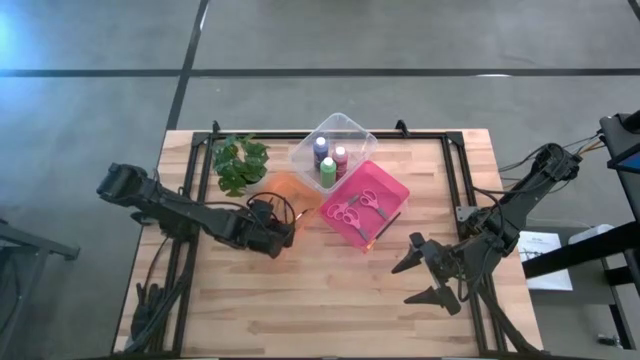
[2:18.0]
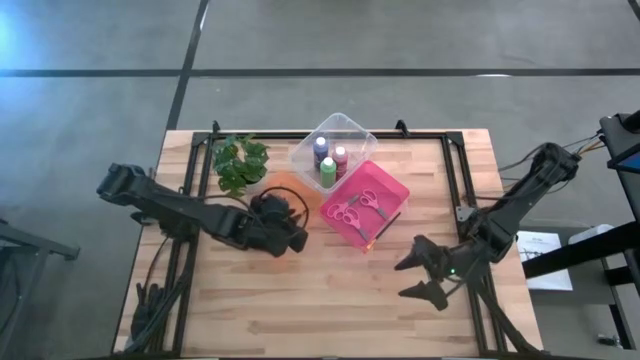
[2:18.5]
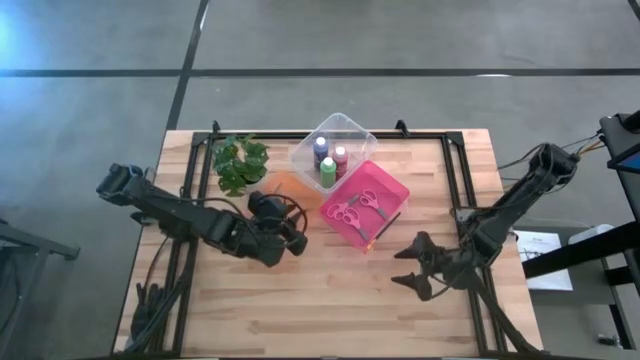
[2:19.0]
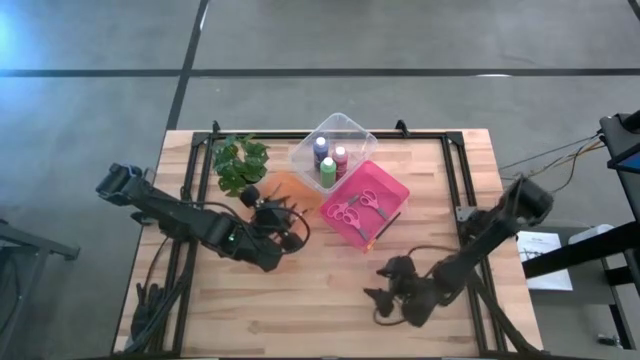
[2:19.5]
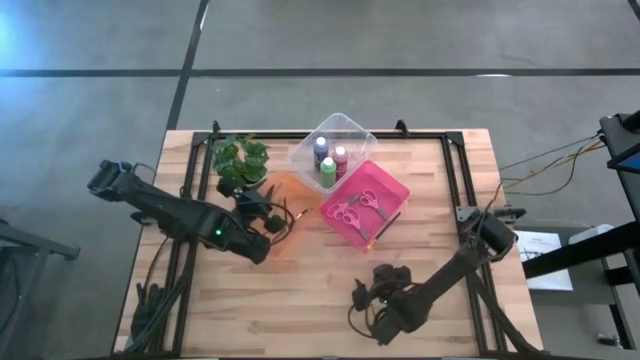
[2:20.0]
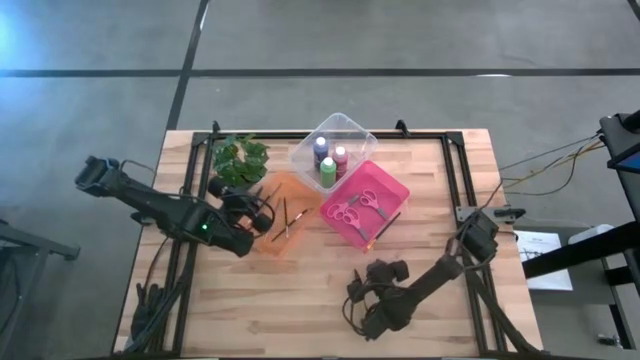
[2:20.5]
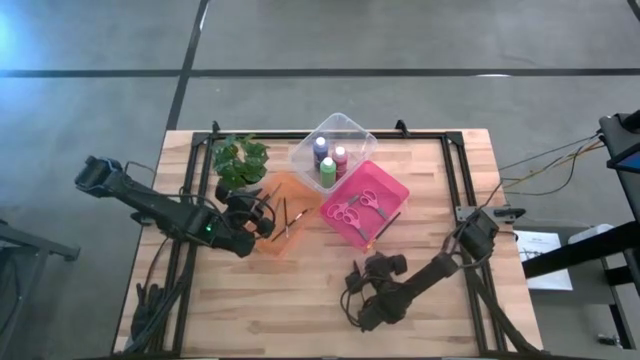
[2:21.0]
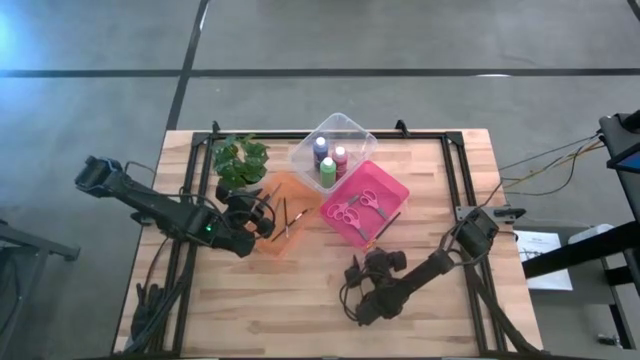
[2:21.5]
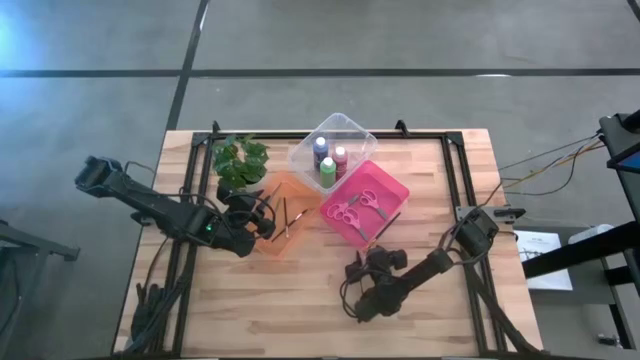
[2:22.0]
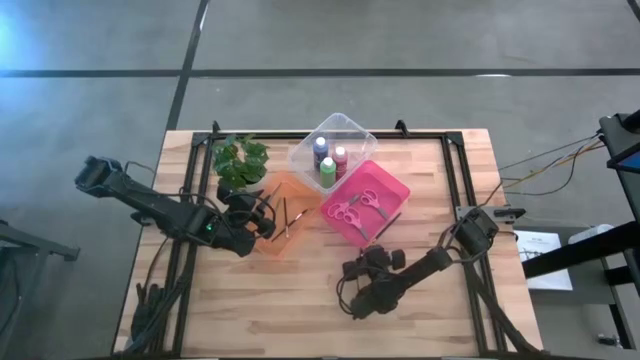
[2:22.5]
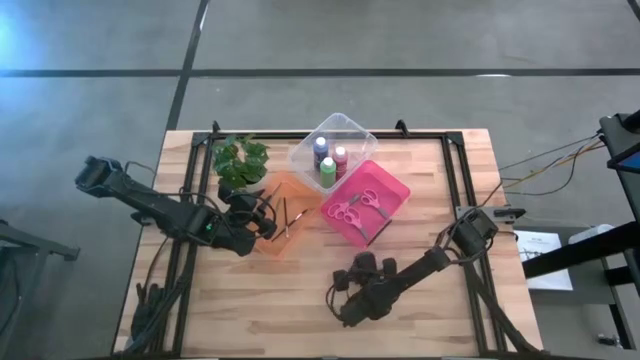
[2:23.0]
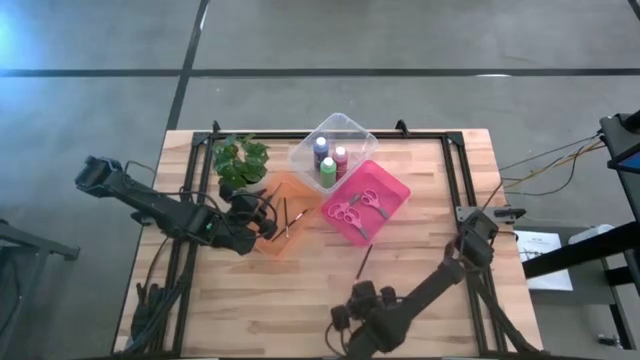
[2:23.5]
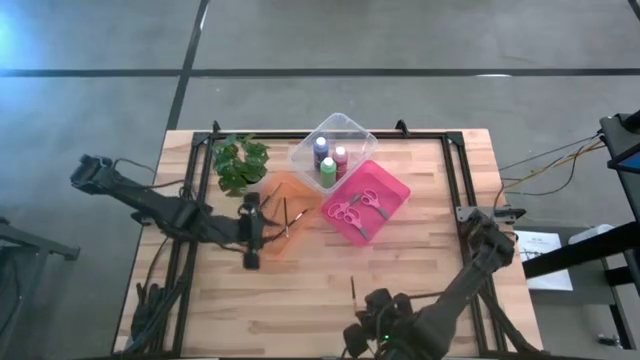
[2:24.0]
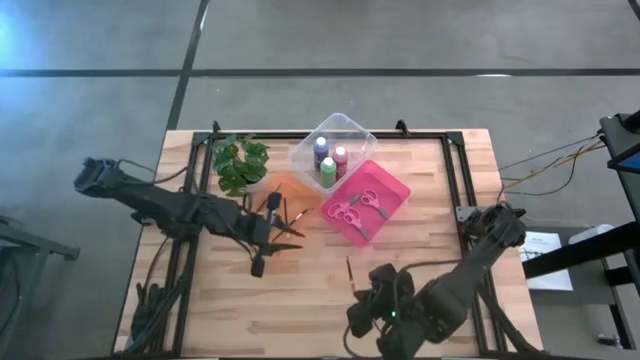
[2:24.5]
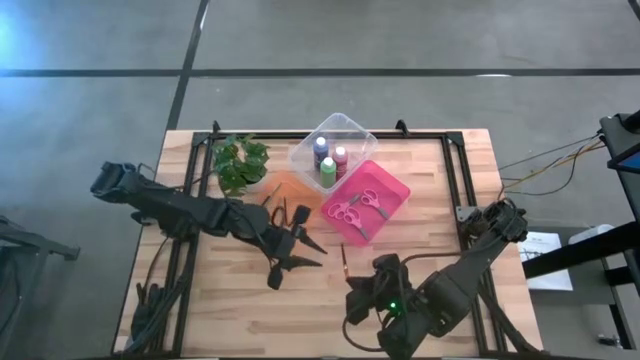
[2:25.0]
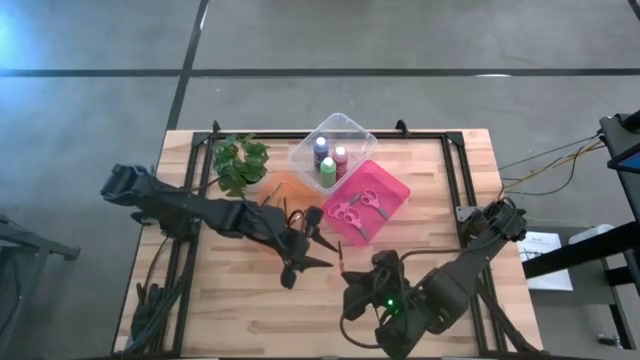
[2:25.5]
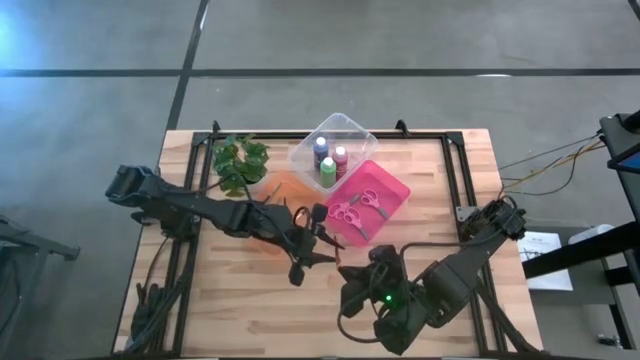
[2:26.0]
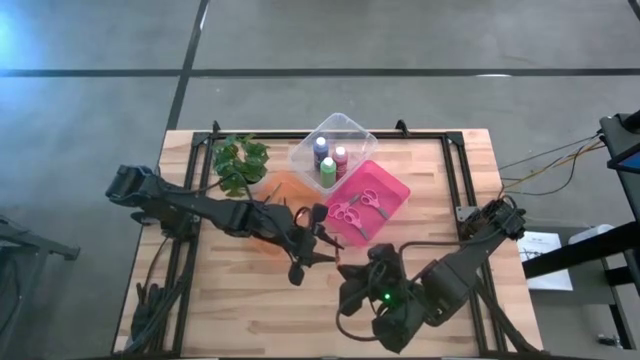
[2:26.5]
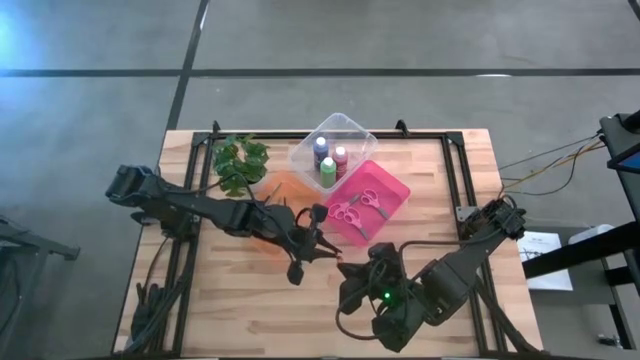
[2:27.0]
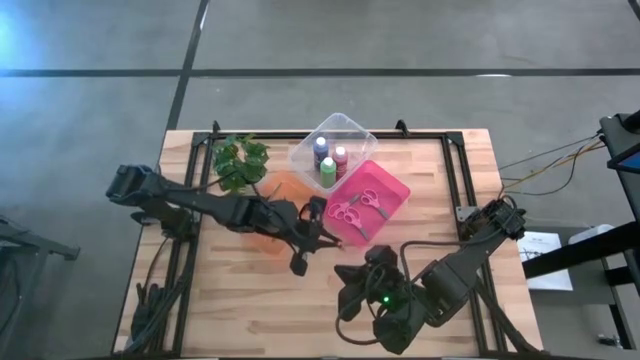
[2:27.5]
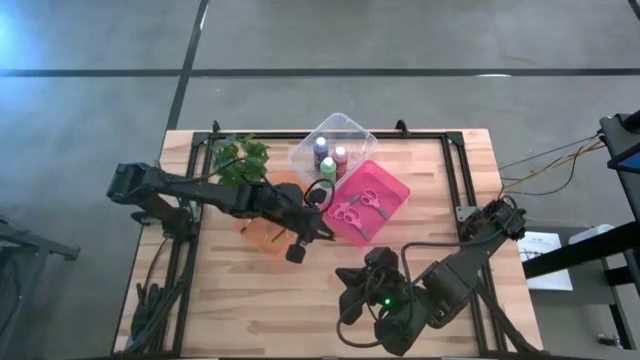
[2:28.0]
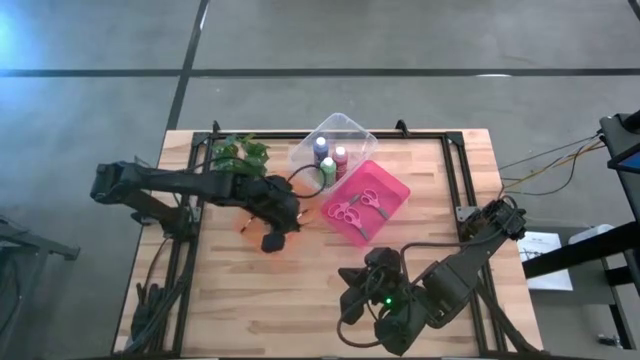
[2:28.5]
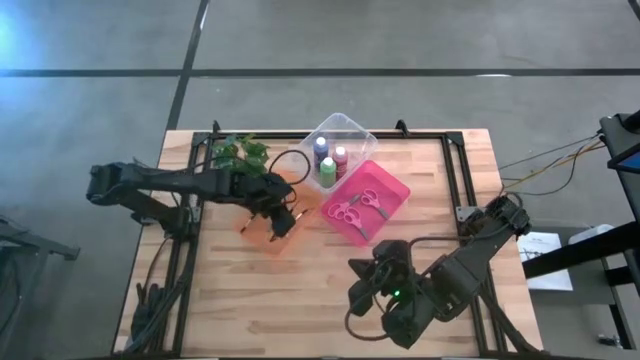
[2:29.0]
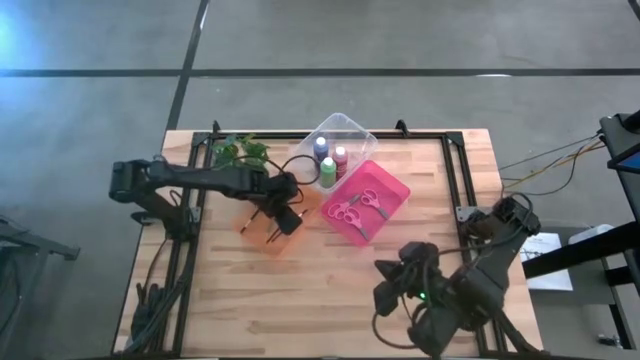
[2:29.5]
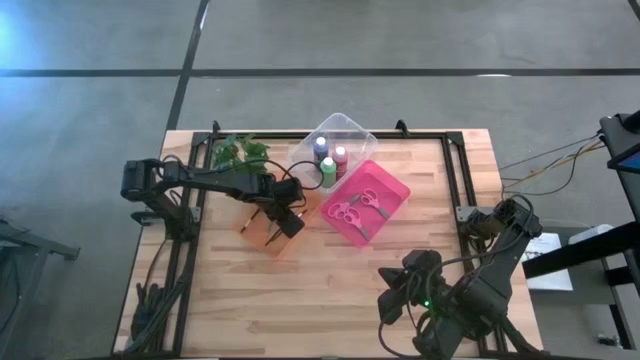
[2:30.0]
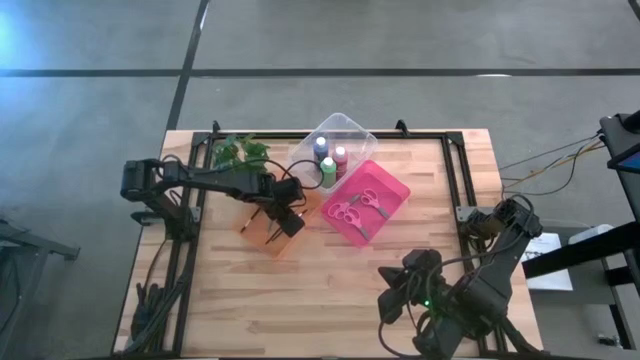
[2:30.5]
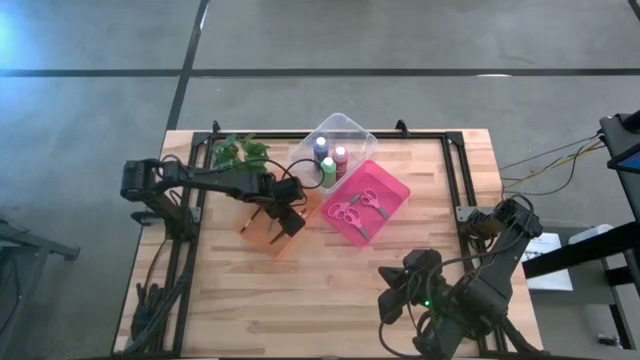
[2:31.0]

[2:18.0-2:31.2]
Task: Pick & Place Paint Supplies
Put the black paint brush into the yellow bin

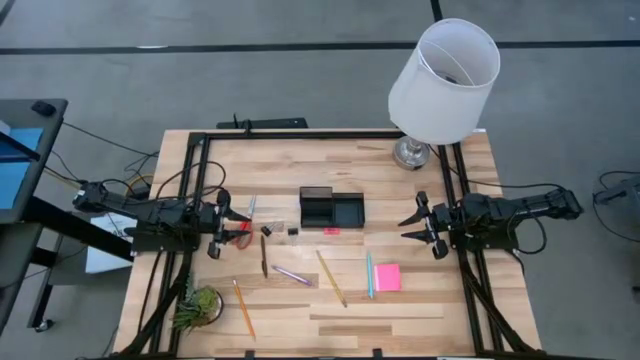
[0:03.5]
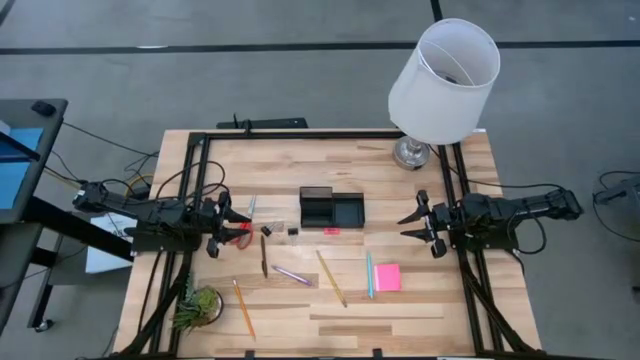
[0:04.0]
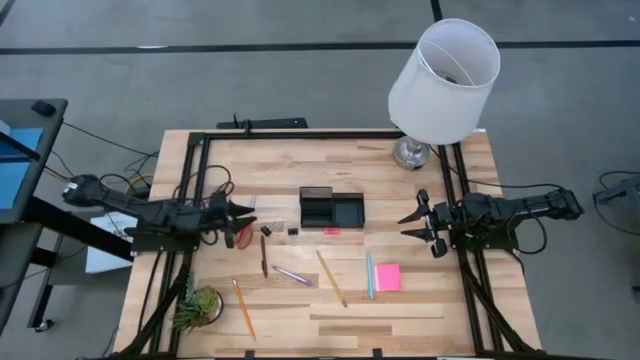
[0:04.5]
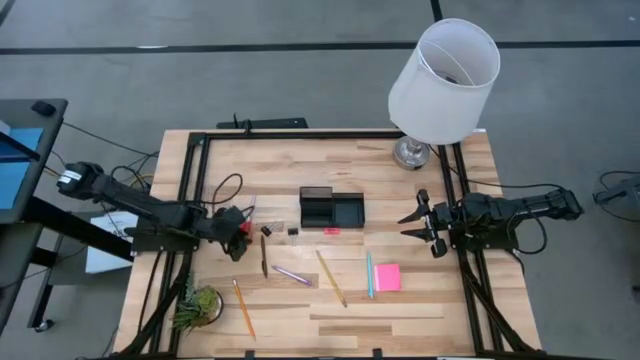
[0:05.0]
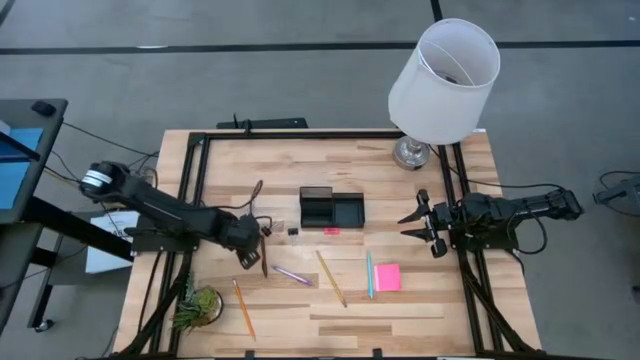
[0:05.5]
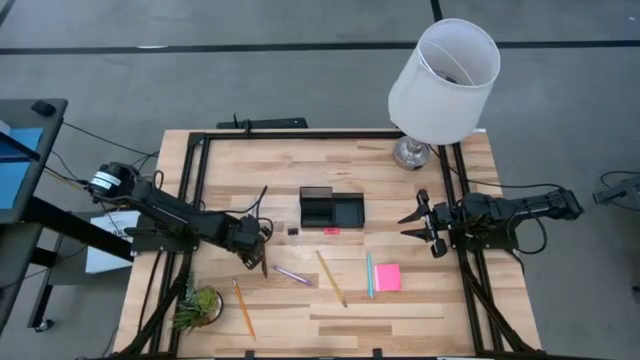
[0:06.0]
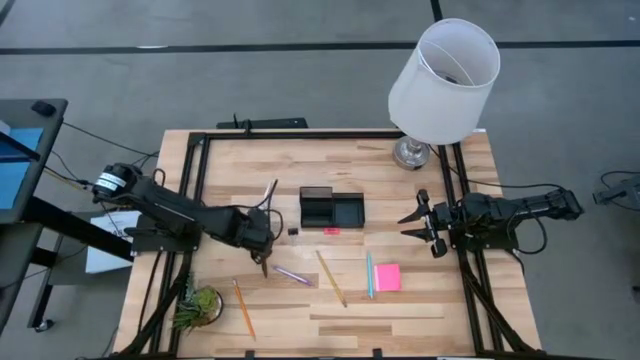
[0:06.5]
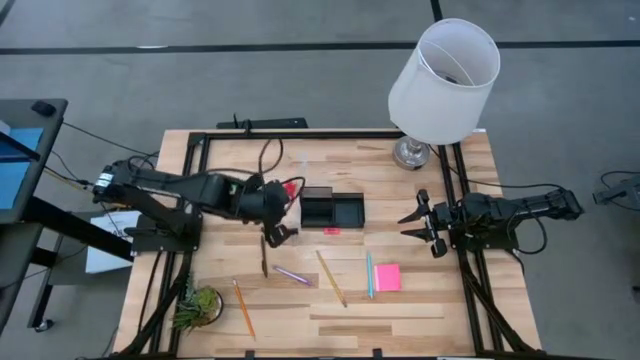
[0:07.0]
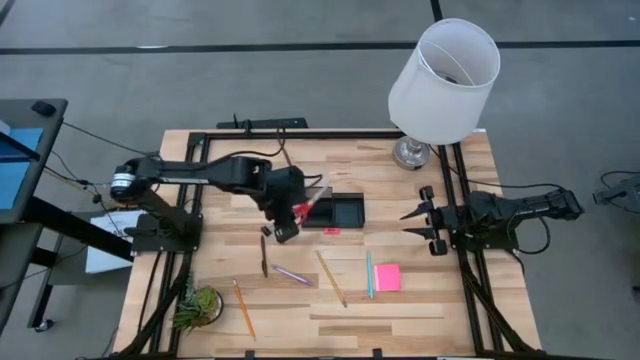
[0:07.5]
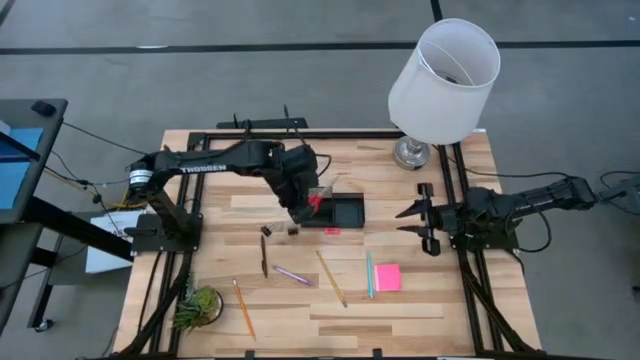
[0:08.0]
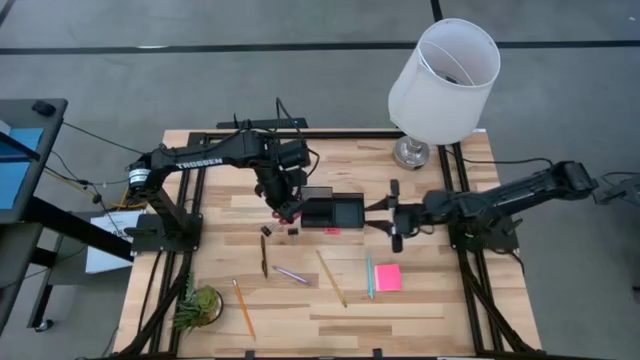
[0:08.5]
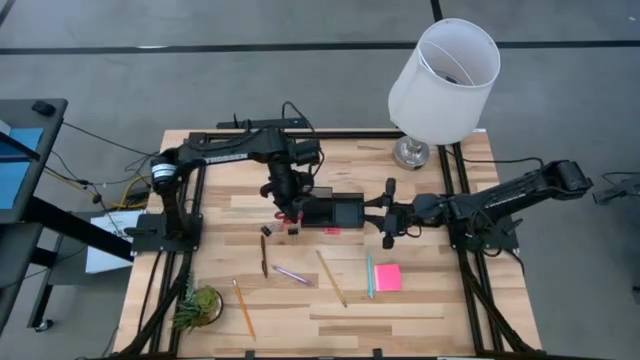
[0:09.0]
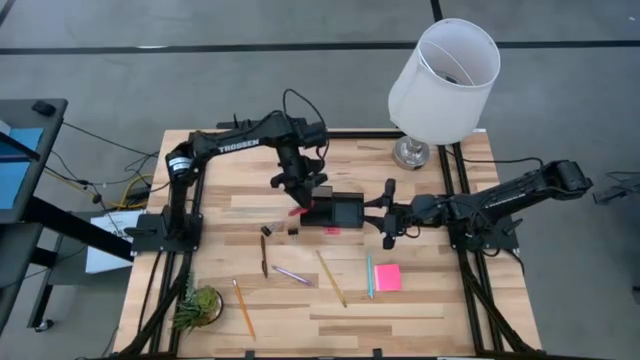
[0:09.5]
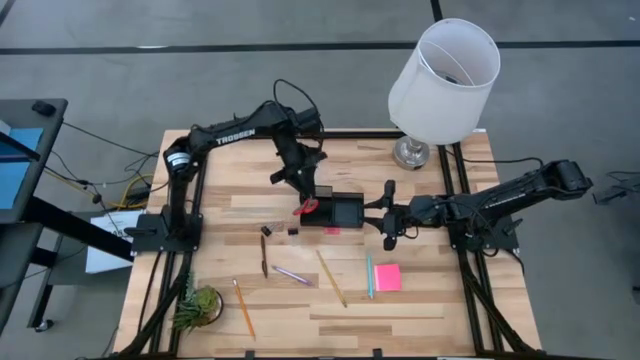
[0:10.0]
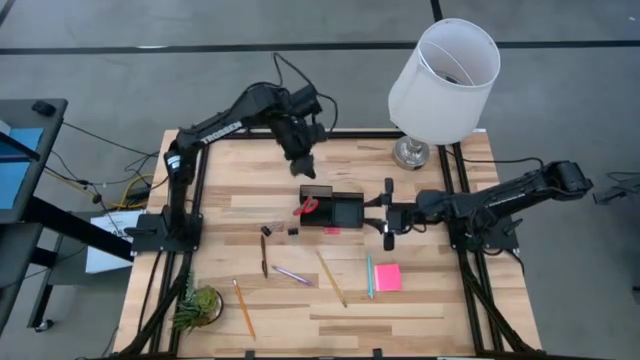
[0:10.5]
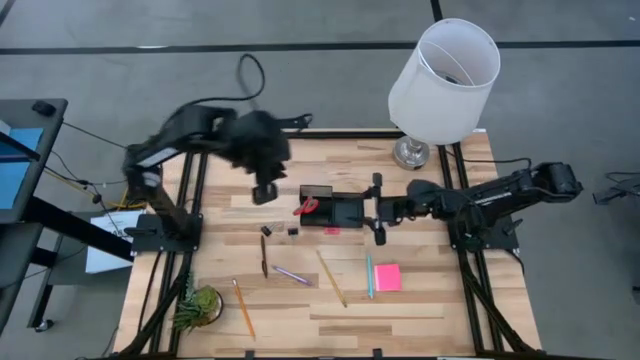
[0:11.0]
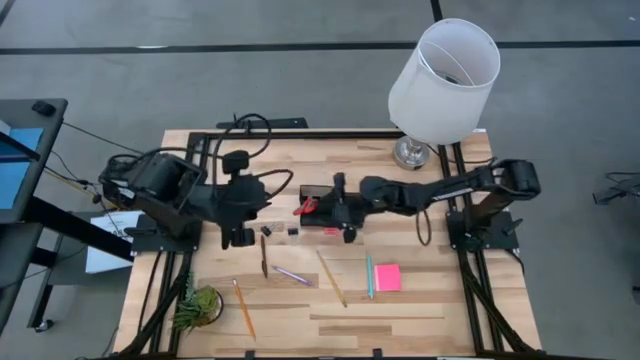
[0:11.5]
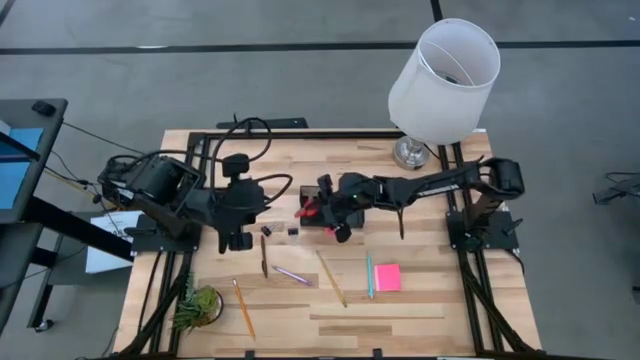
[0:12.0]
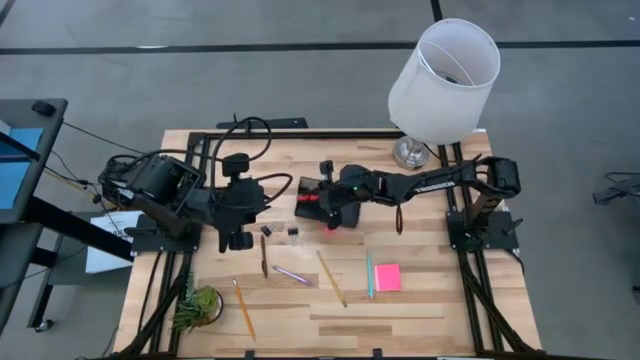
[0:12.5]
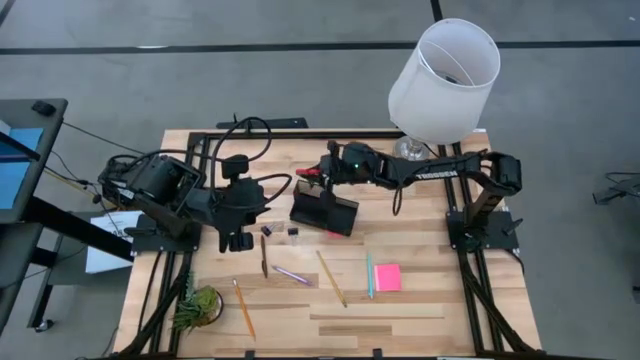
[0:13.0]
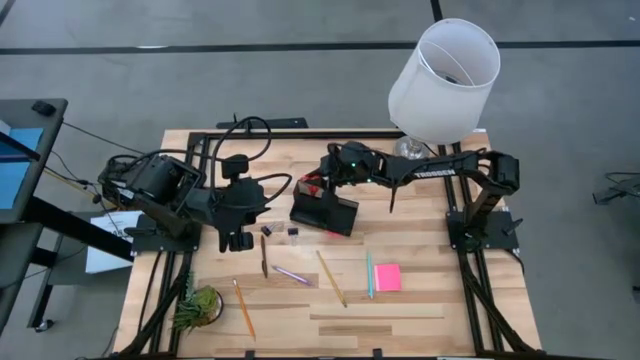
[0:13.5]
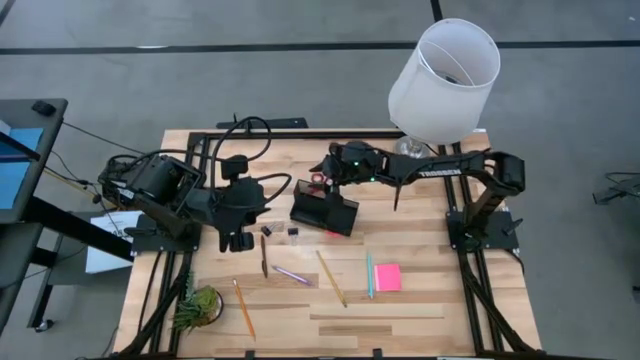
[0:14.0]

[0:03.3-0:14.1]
Task: Pick and place office supplies into organizer
Put the red scissors into the top left compartment of the black desk organizer
